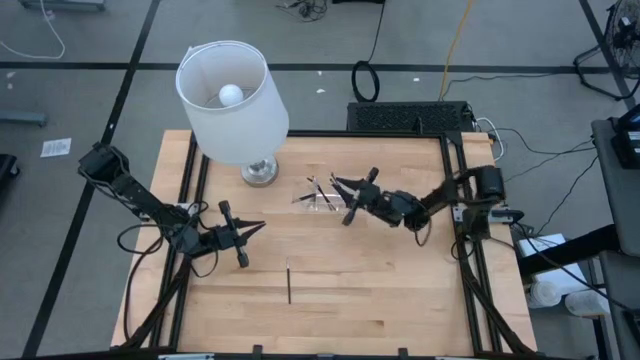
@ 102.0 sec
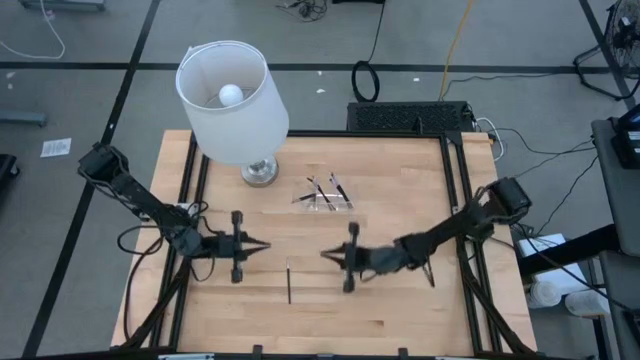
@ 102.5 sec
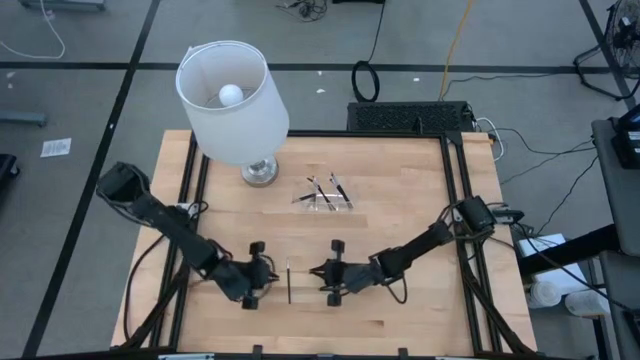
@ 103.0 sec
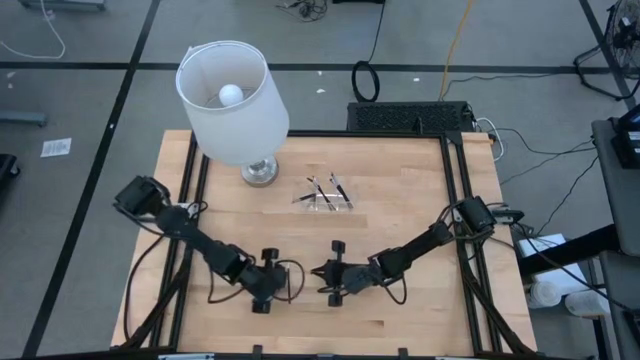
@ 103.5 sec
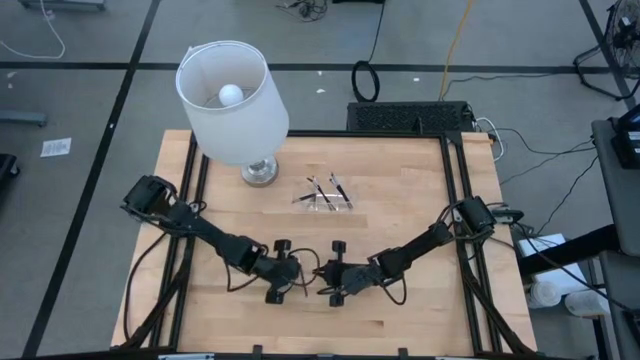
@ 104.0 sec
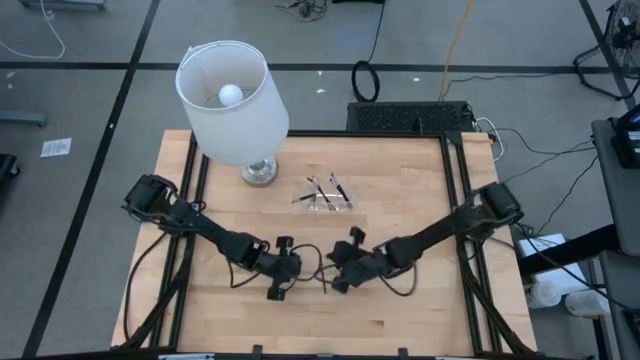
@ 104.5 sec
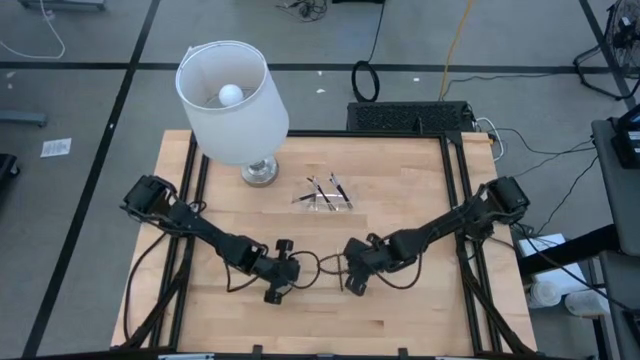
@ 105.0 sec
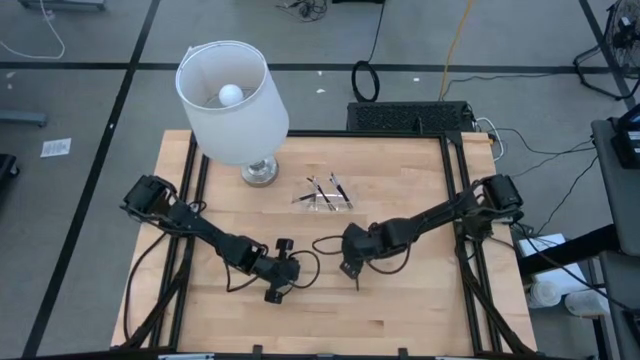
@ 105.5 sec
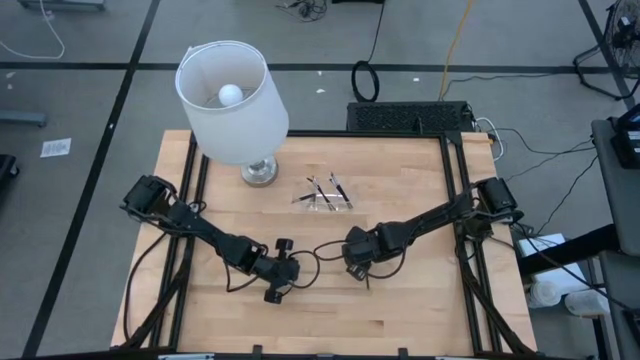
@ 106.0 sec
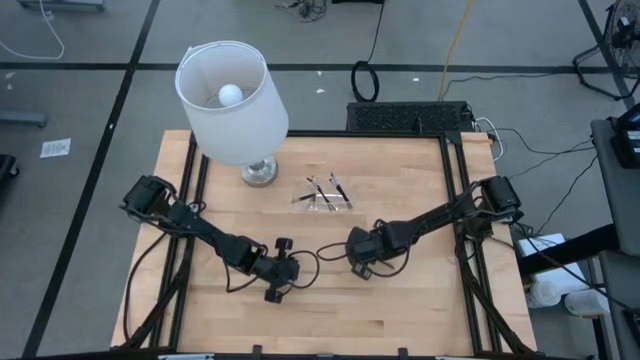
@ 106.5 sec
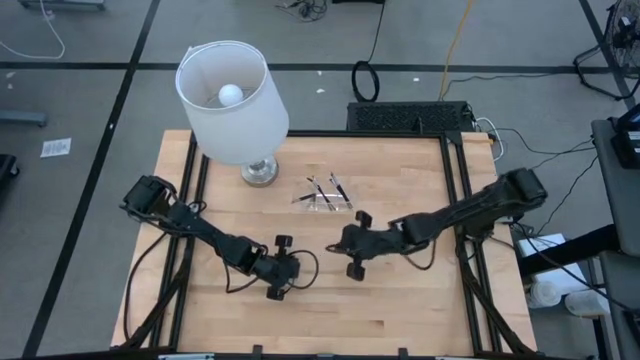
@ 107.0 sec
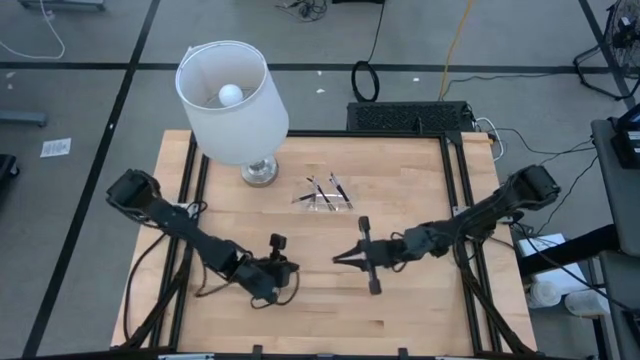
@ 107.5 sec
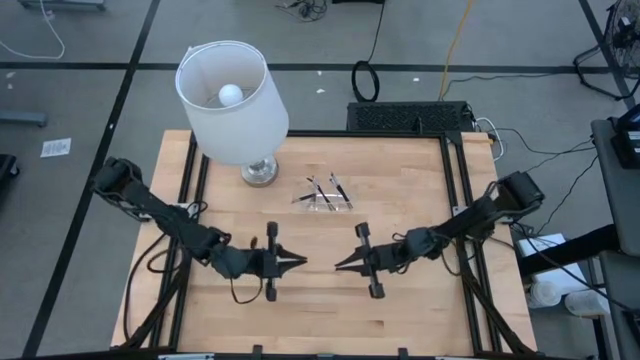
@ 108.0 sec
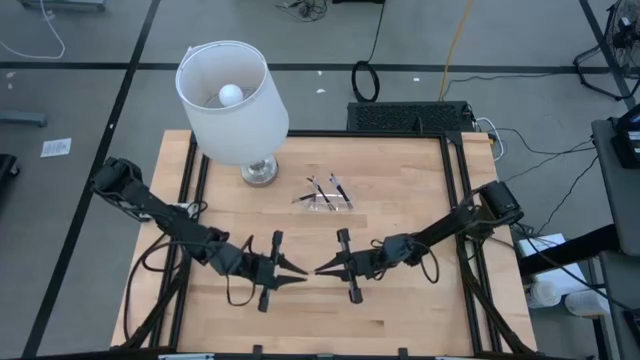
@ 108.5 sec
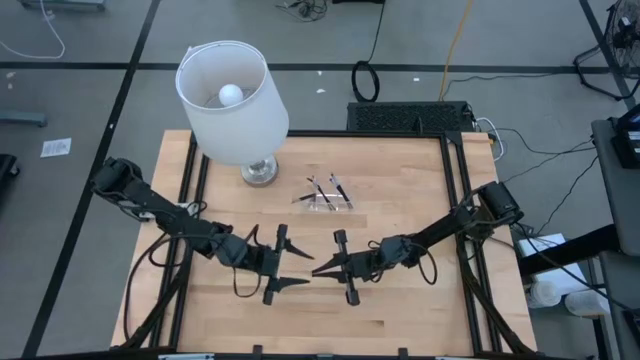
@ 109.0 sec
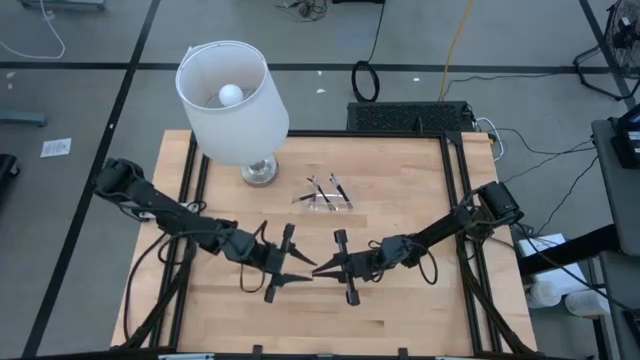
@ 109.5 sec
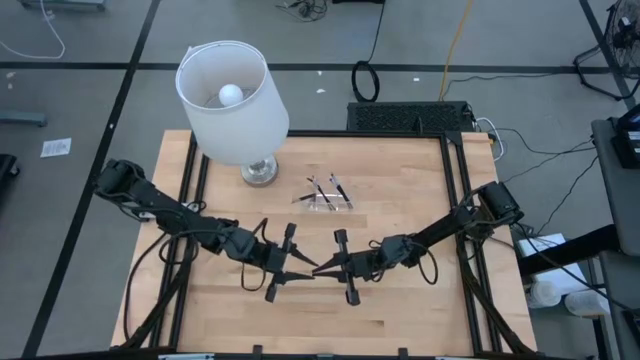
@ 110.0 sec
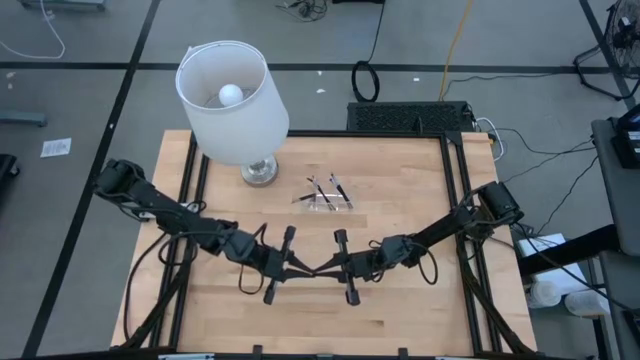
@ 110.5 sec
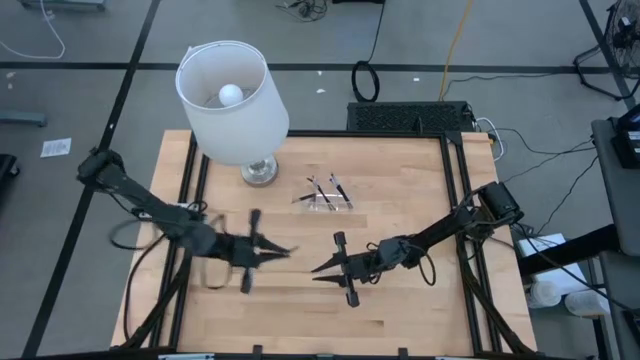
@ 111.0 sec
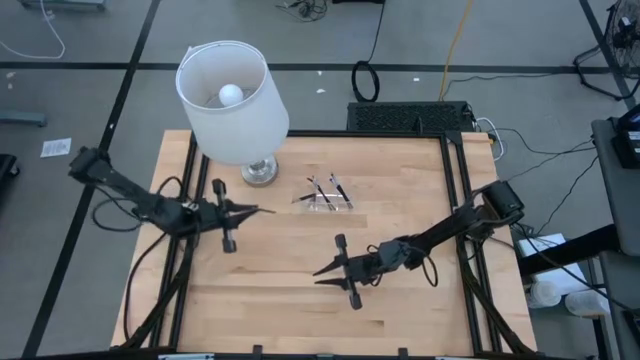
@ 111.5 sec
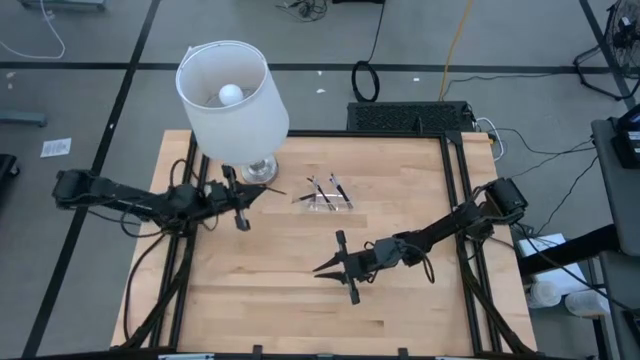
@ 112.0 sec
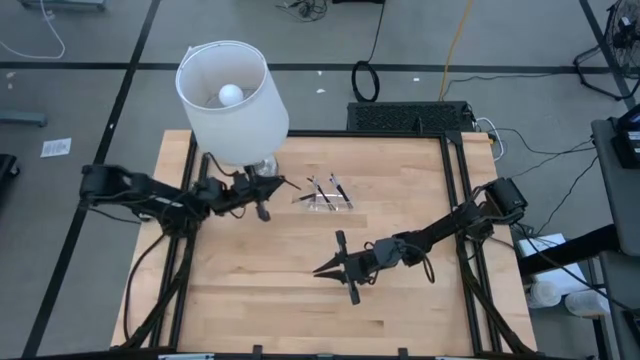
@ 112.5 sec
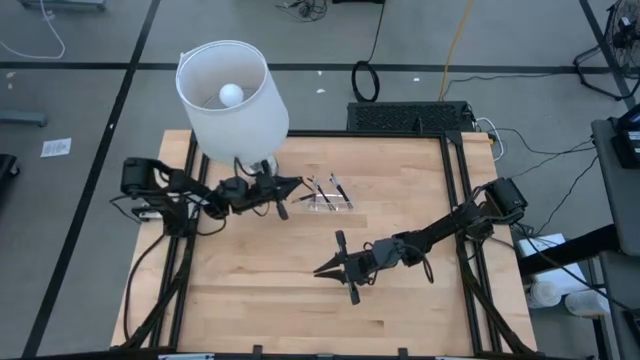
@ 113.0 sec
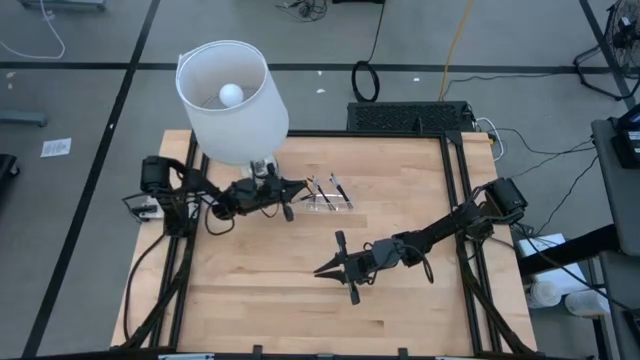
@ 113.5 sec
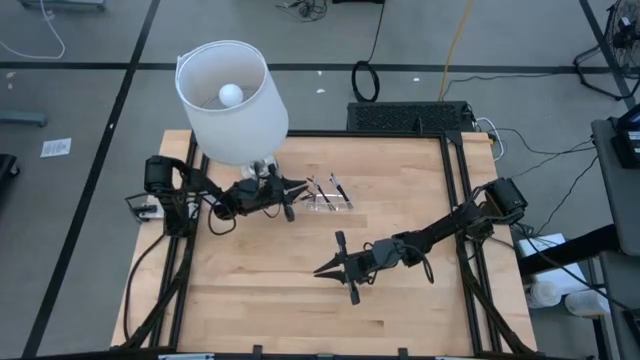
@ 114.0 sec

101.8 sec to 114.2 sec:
Task: Put items in baskets/containers
Put the black liner brush into the transparent organizer

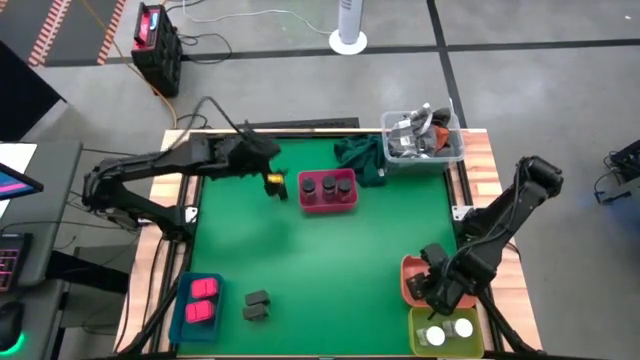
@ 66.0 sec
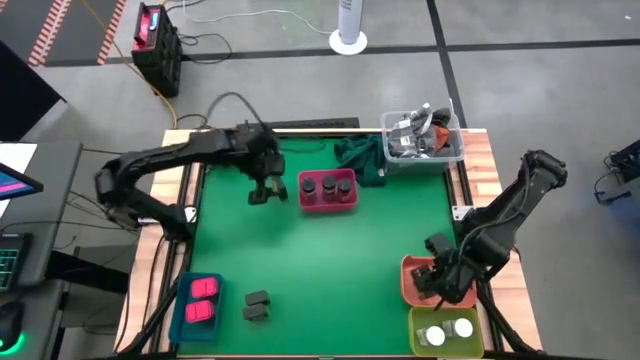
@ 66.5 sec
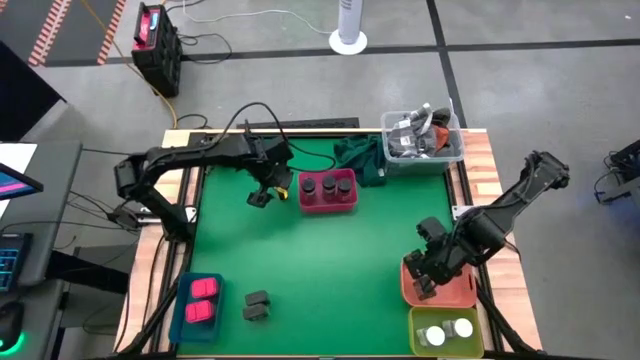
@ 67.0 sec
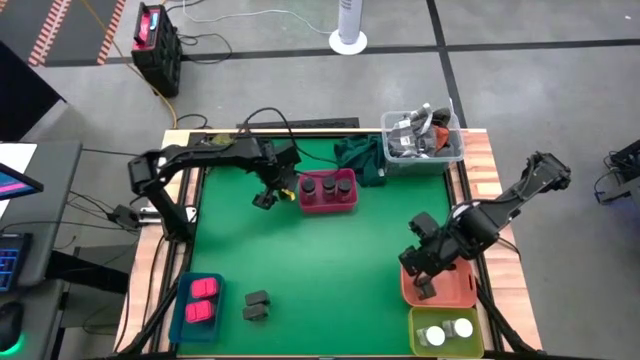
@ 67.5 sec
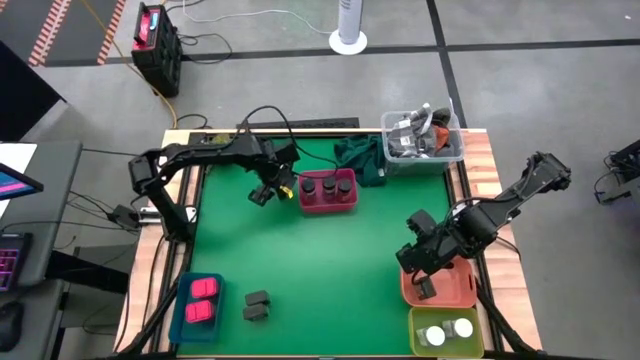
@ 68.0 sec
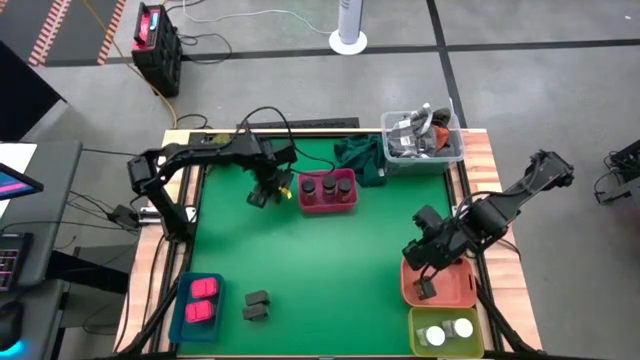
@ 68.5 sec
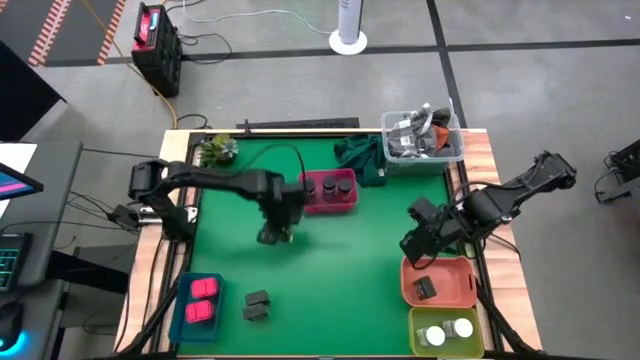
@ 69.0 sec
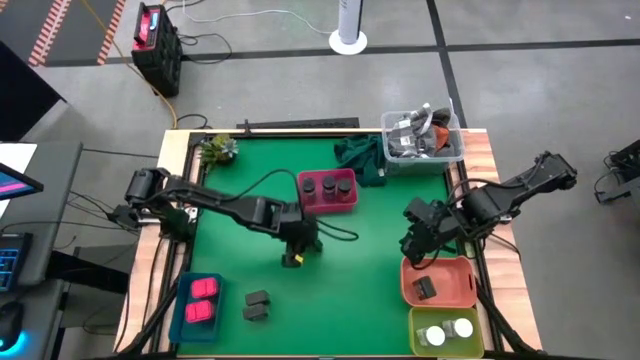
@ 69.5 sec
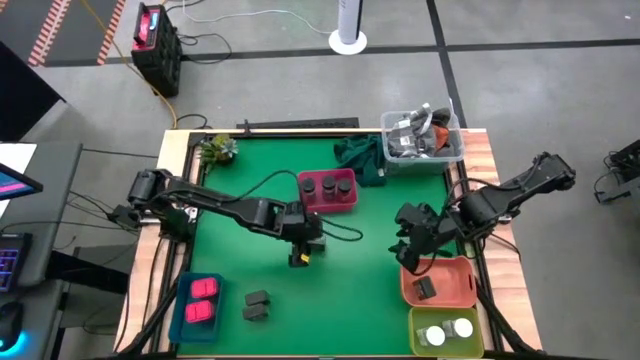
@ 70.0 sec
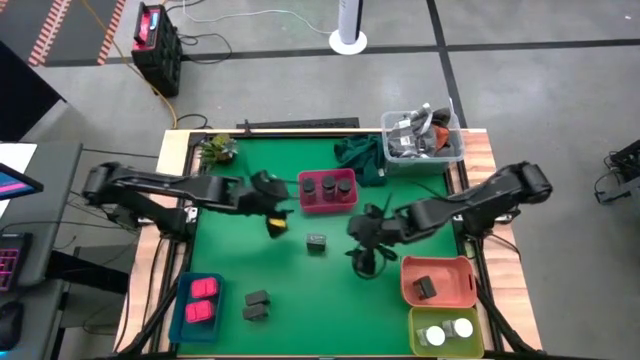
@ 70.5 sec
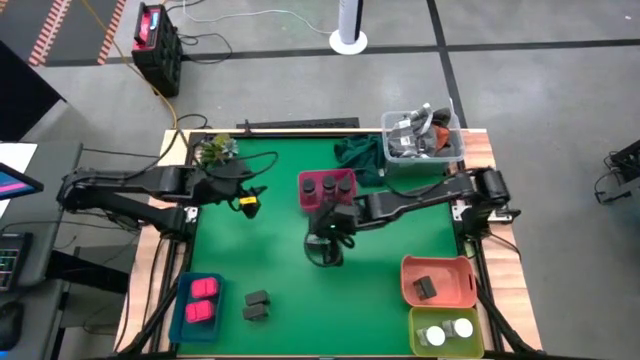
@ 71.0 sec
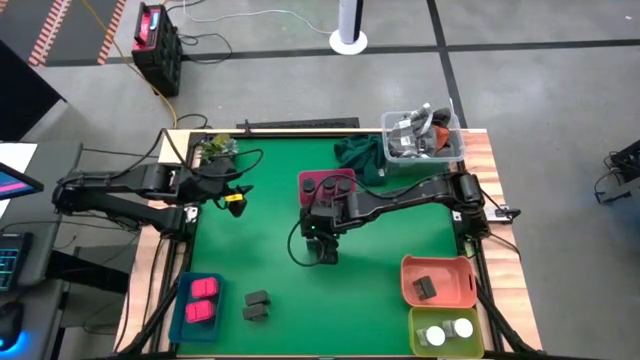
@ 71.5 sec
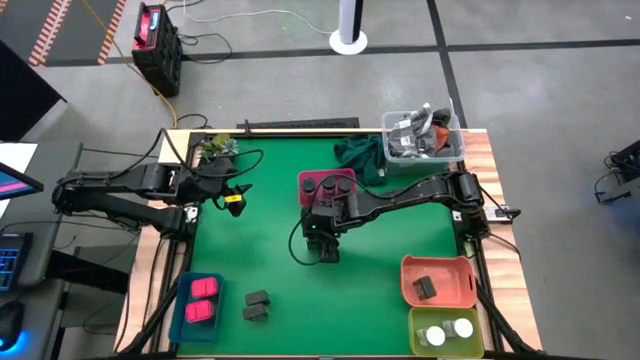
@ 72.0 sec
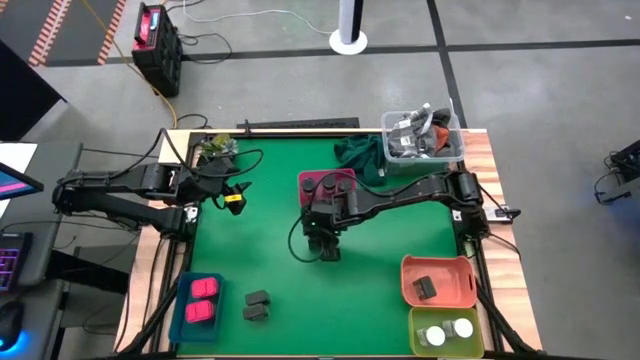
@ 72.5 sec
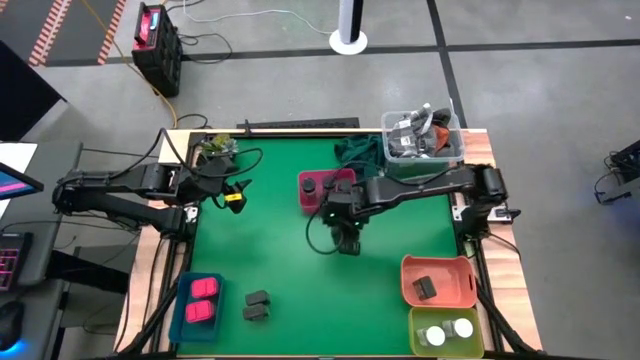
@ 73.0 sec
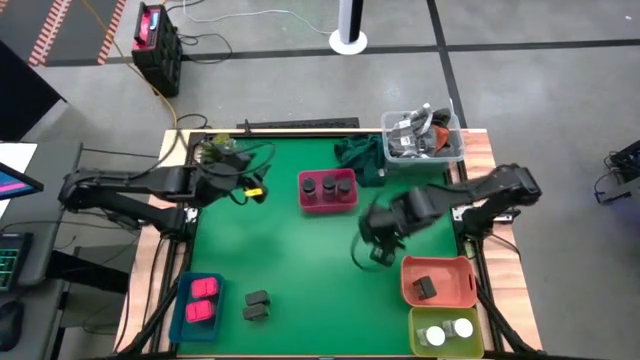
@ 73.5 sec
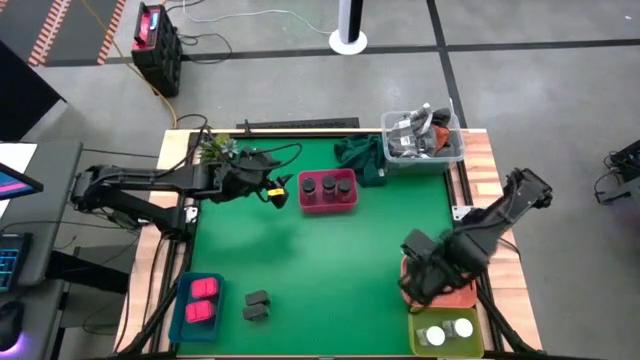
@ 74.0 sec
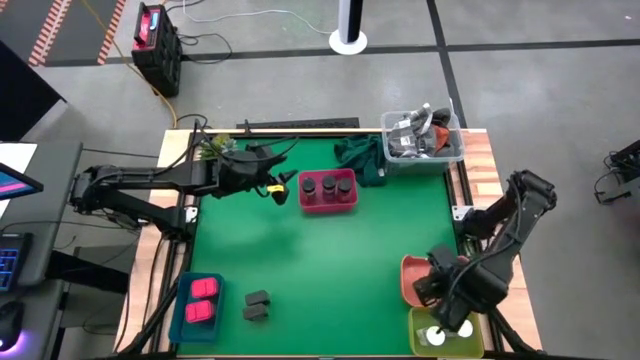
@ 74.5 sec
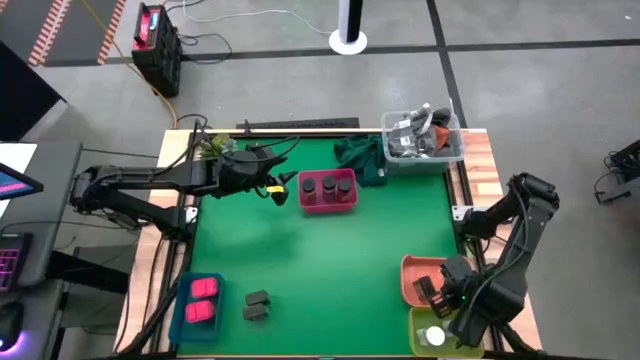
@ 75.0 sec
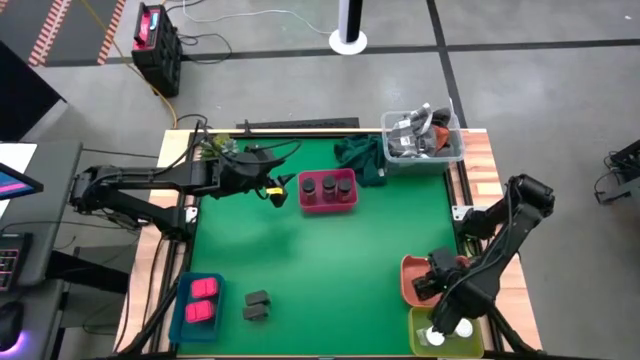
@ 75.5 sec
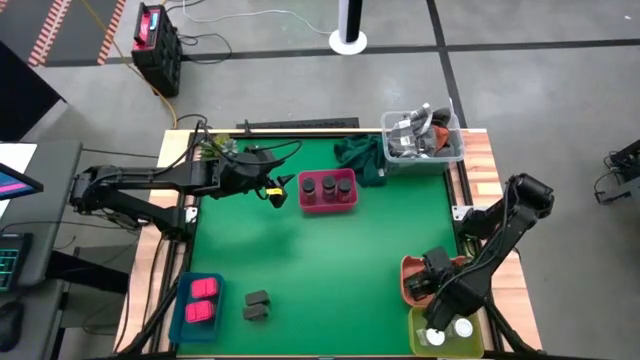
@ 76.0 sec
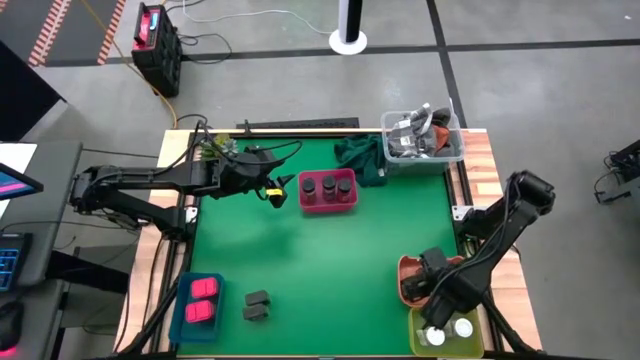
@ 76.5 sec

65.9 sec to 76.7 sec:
Task: Sort spices by type
Put the top black seasoning can into the orange bin
